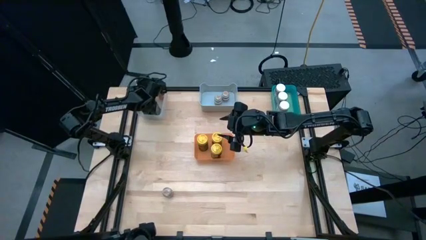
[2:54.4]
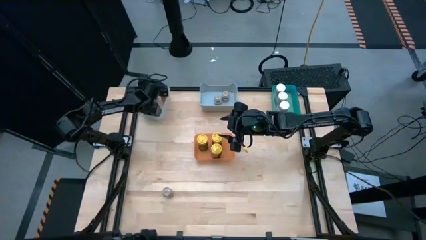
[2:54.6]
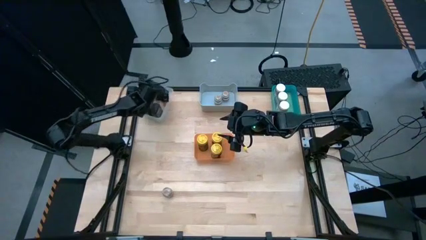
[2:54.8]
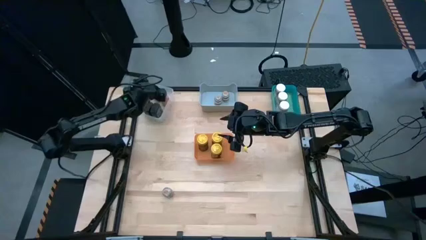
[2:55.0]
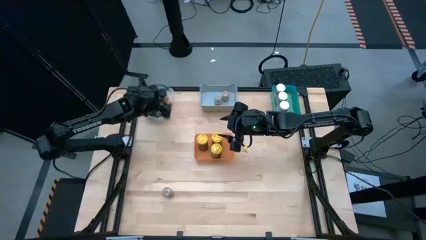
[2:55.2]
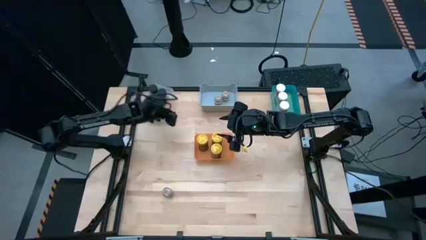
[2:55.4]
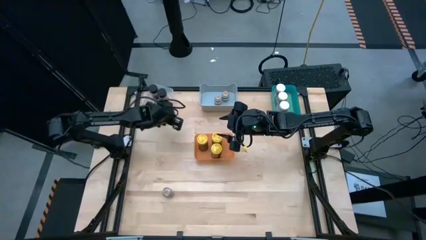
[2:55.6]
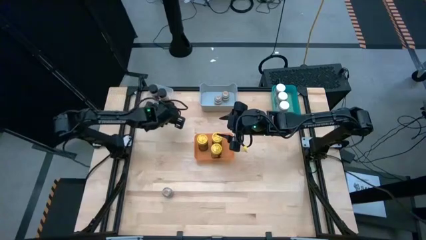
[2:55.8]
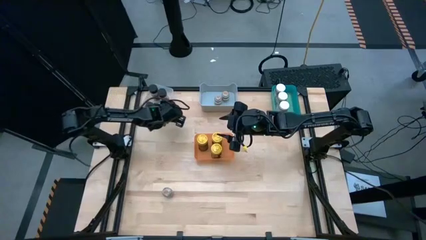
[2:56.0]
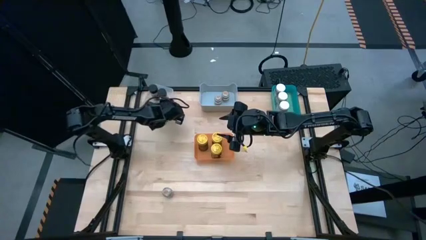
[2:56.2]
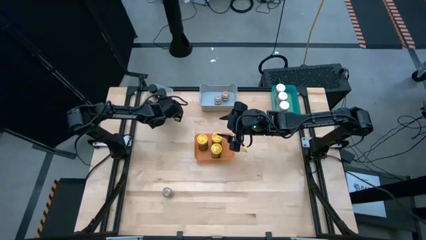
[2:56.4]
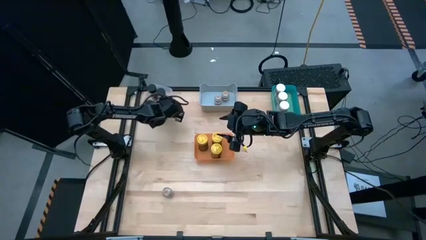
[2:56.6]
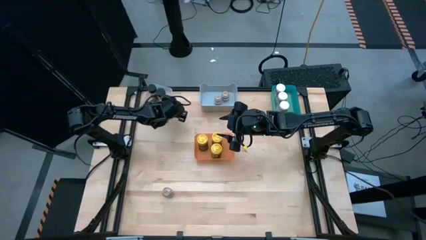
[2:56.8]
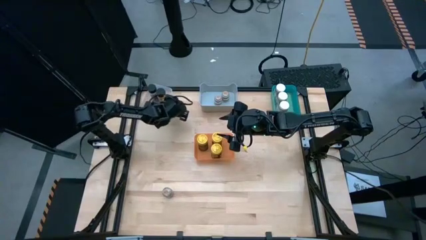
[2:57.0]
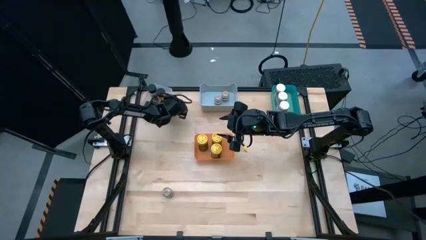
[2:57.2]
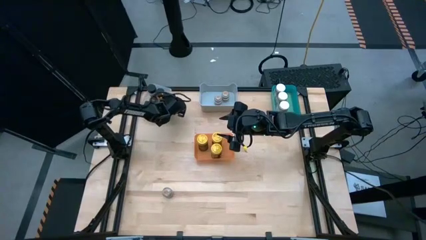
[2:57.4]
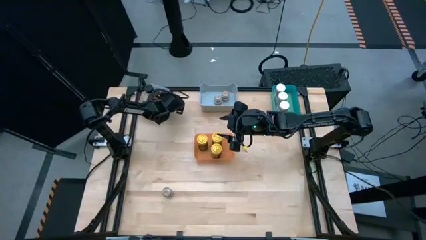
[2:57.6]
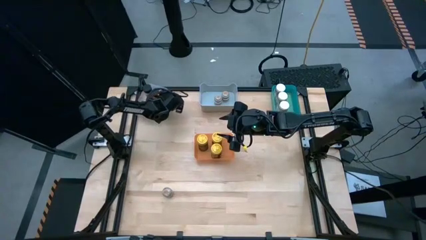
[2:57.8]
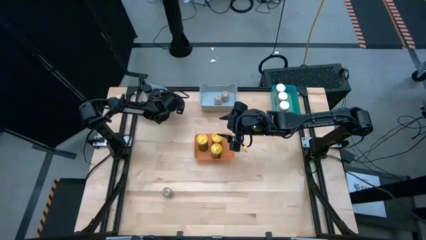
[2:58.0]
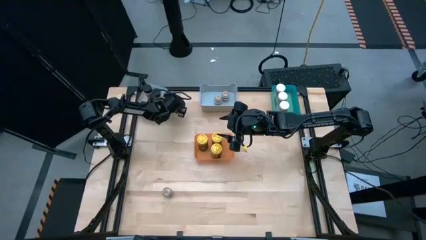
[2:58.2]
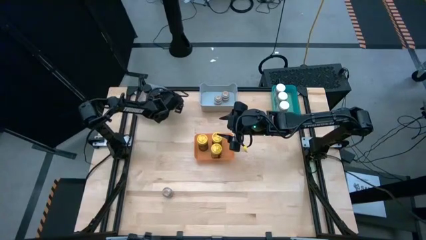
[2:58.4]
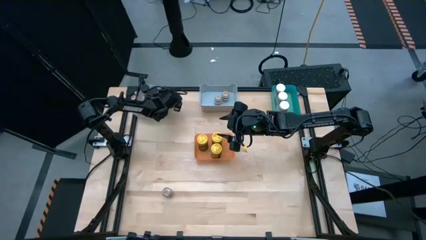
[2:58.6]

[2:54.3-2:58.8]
Task: Sort spices by type
Adjust the transparent bin

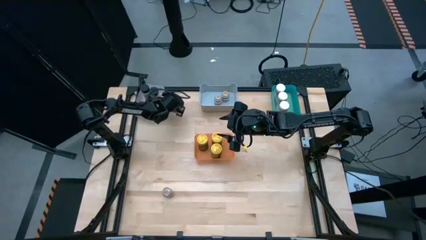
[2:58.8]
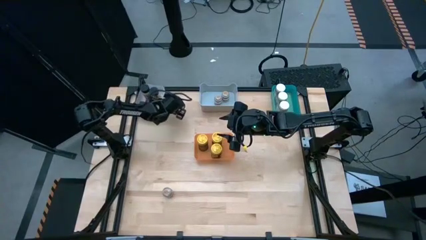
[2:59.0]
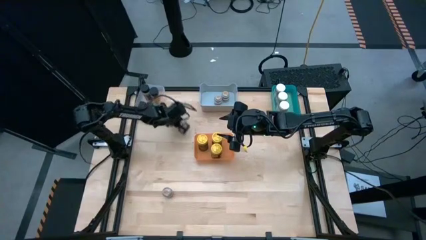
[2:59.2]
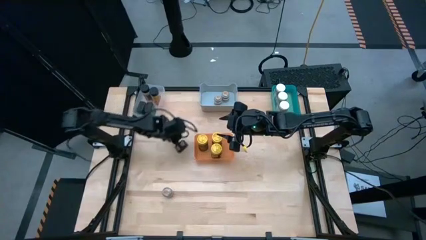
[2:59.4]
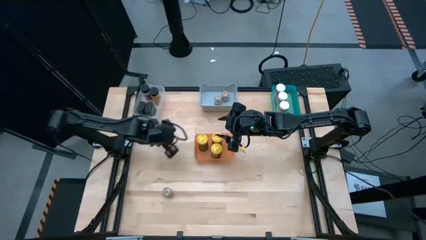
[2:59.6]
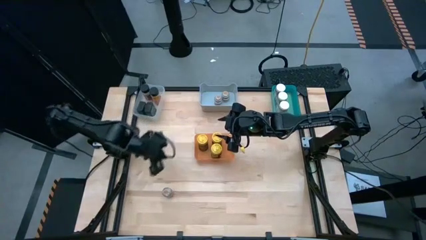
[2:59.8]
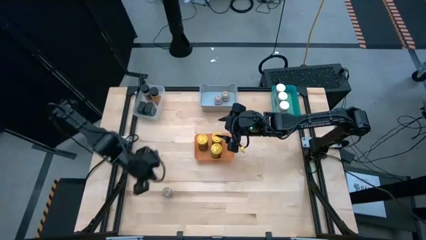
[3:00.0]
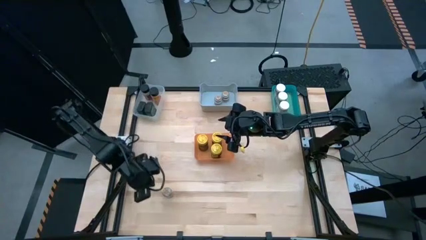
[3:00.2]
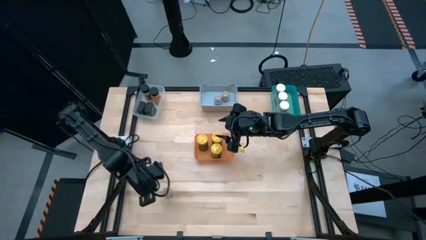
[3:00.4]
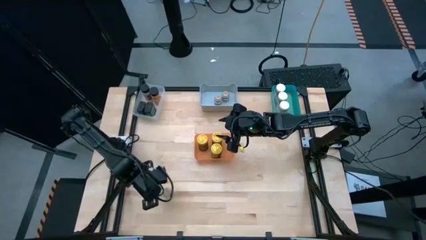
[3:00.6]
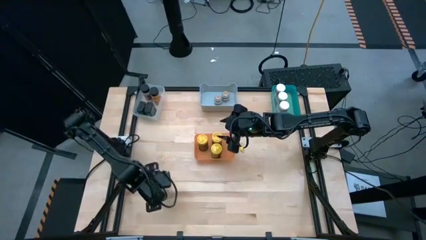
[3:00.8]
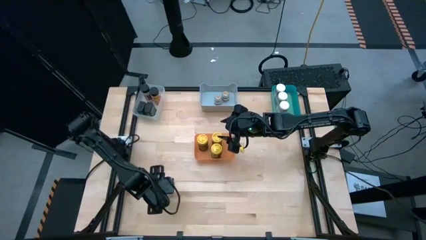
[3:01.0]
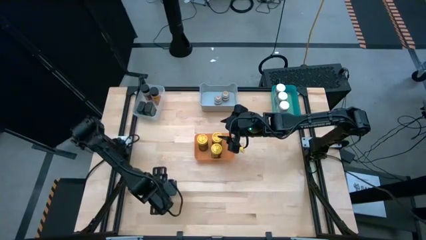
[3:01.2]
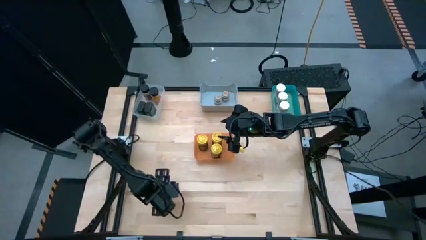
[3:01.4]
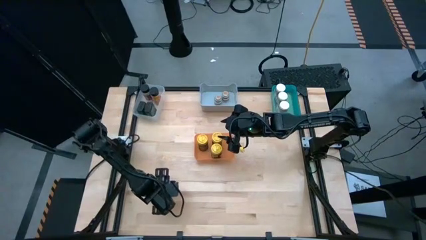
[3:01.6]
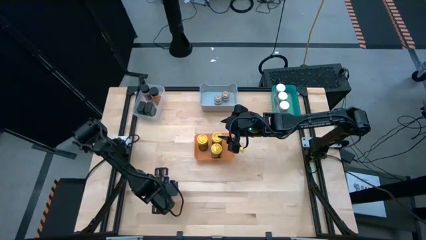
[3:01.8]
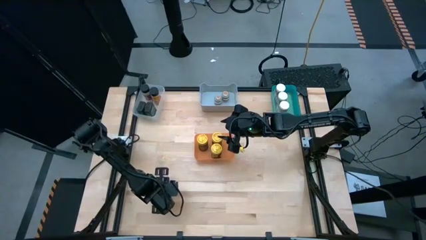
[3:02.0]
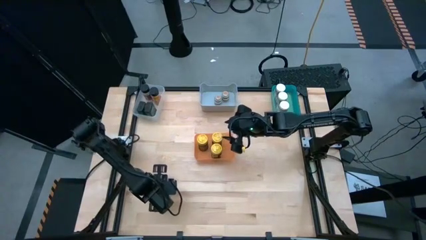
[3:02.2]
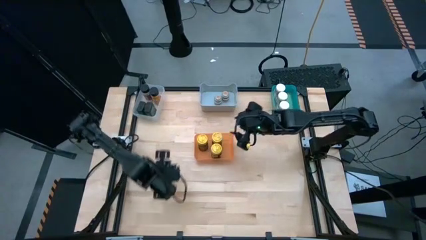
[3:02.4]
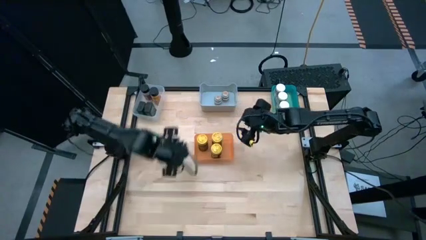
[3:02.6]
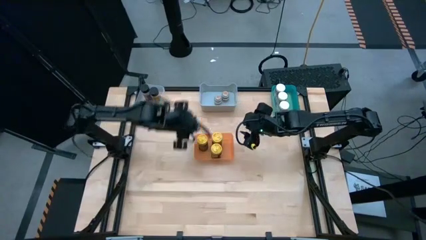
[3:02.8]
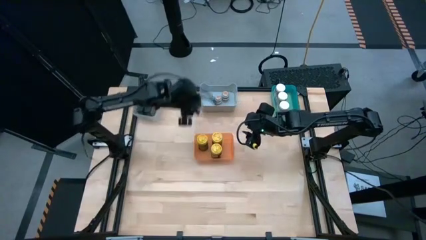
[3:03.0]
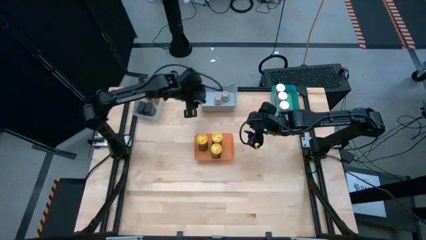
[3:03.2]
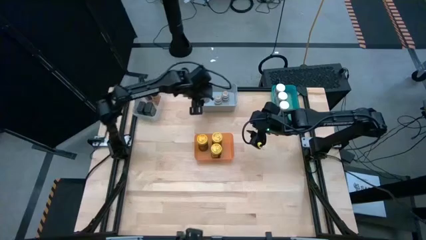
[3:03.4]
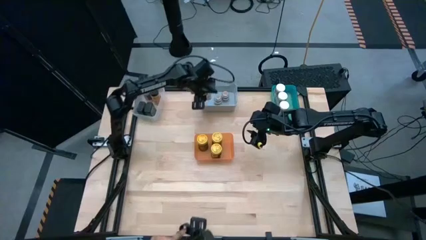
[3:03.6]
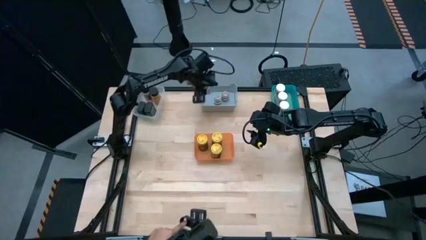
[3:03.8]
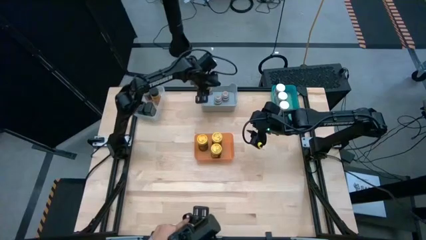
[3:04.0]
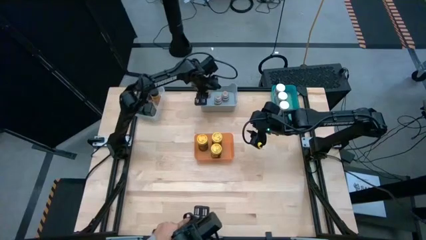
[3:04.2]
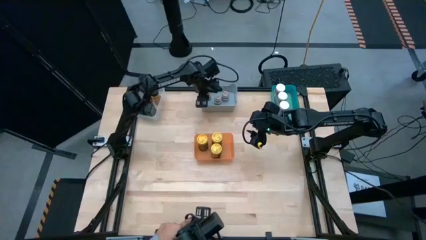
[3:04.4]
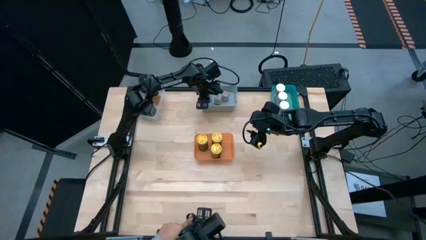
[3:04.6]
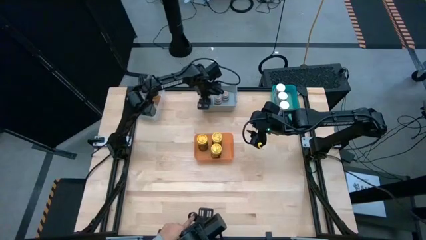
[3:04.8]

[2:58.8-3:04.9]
Put the brown seasoning bottle into the gray bin

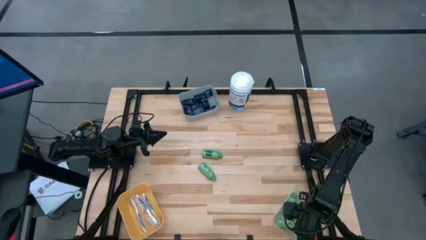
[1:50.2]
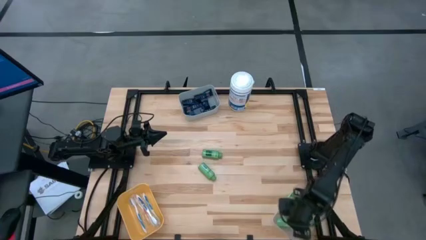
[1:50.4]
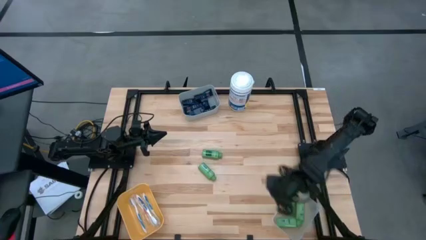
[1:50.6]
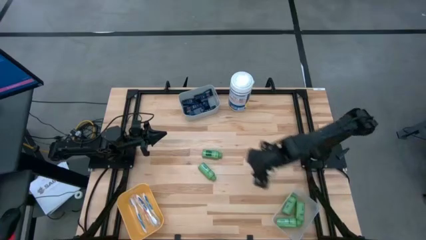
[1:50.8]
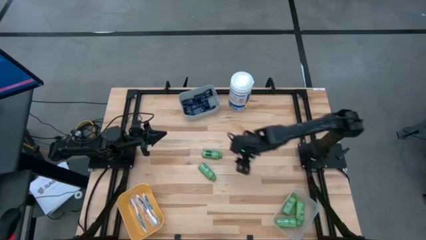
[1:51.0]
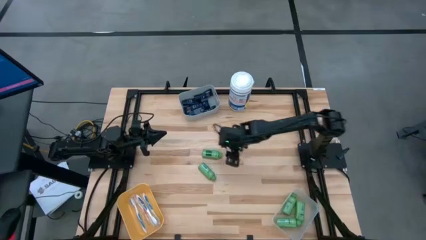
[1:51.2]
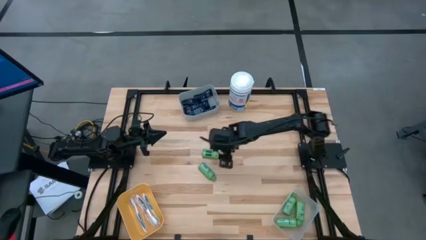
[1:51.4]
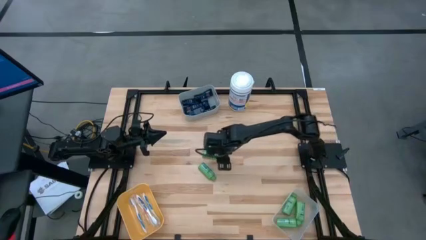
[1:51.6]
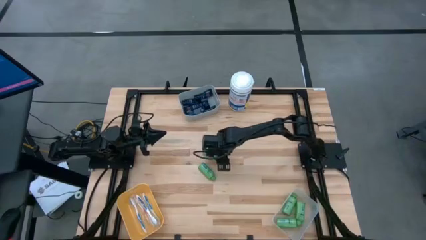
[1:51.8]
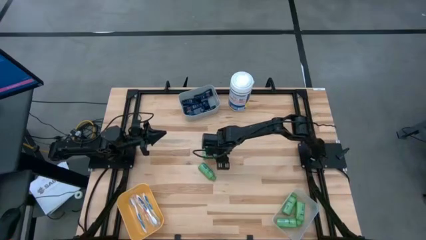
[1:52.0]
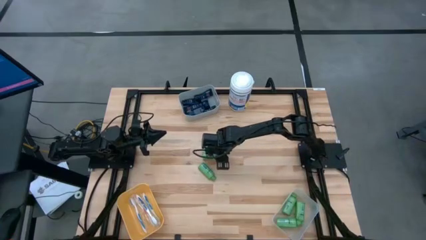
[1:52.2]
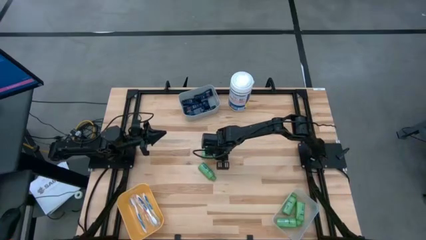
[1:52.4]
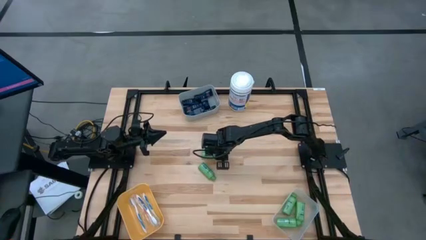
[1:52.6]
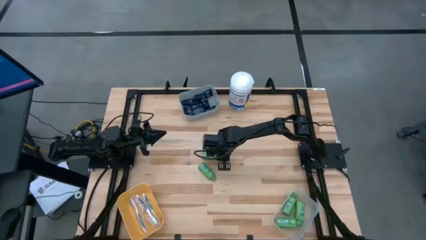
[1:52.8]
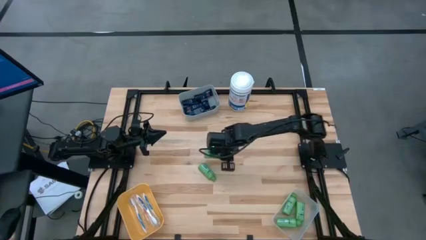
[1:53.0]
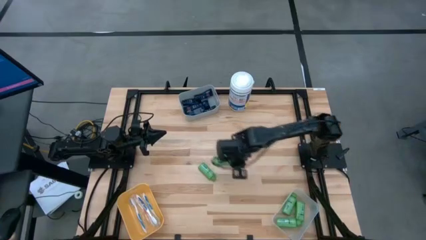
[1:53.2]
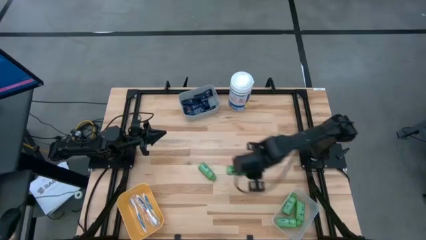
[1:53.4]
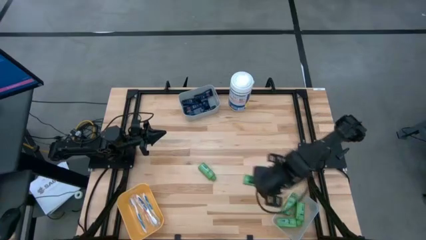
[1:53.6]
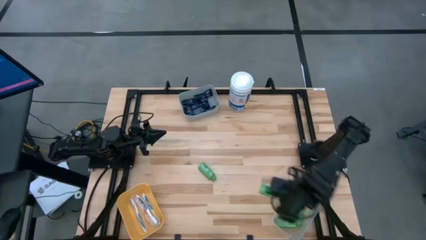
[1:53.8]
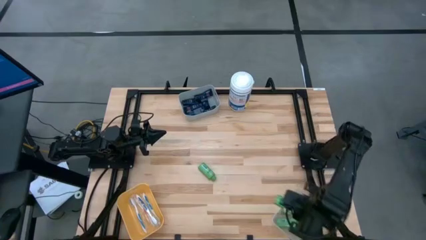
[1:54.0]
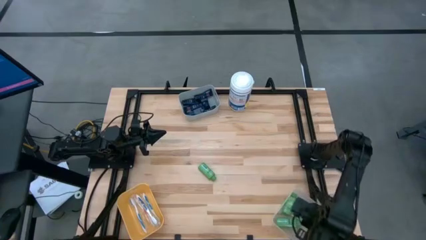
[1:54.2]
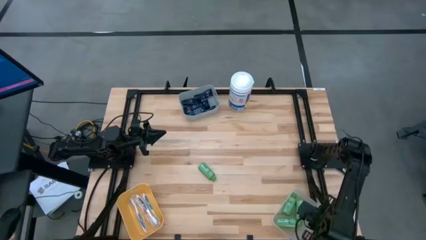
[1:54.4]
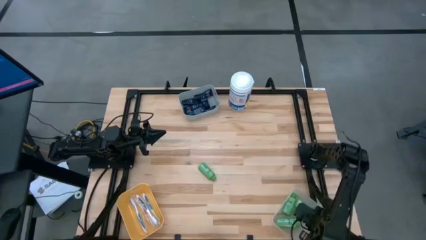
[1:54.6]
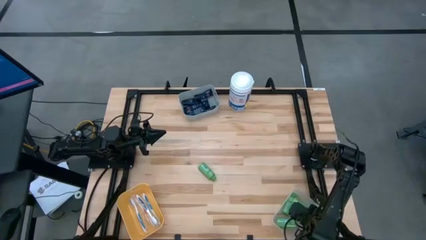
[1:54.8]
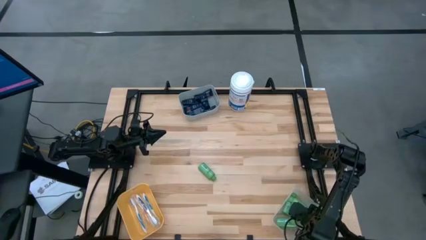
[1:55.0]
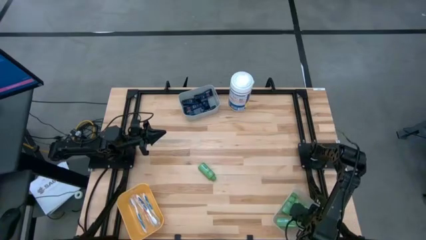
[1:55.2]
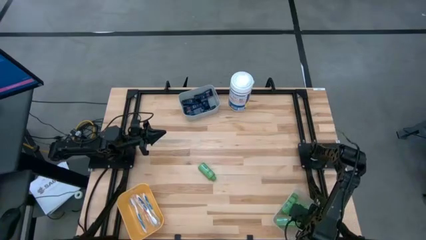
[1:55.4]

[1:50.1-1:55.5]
Task: Pick & Place Travel size toiletries
Put the green shampoo into the transparent bin
